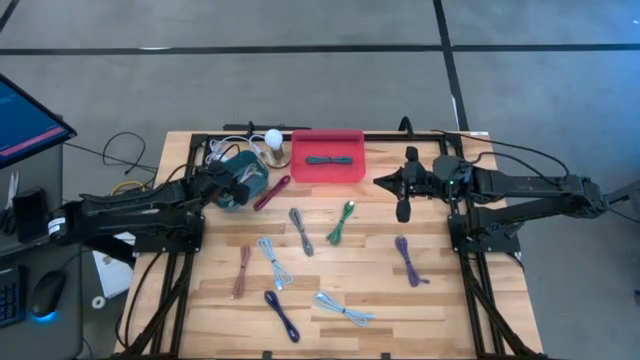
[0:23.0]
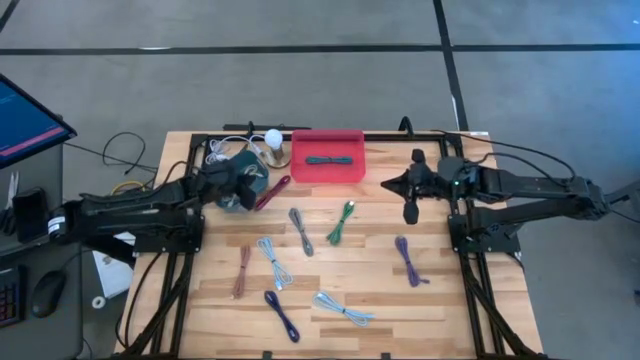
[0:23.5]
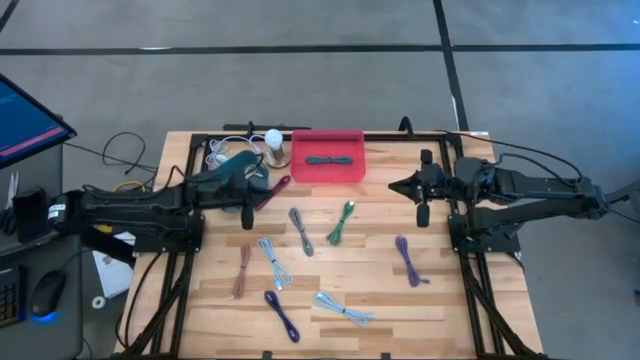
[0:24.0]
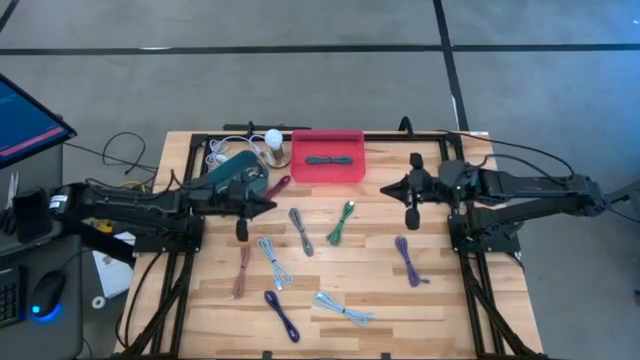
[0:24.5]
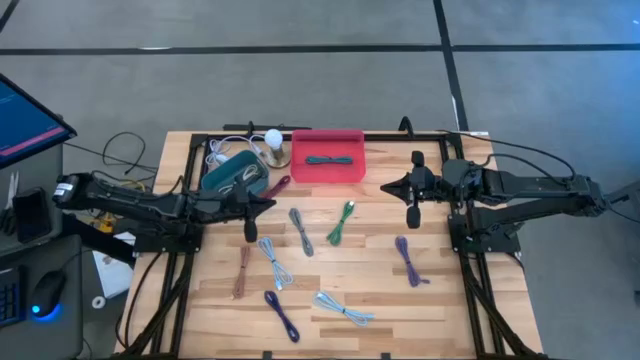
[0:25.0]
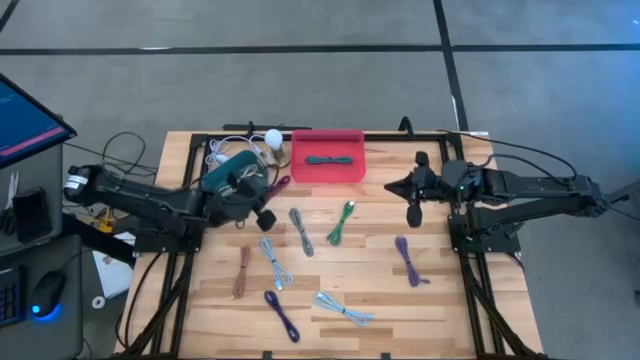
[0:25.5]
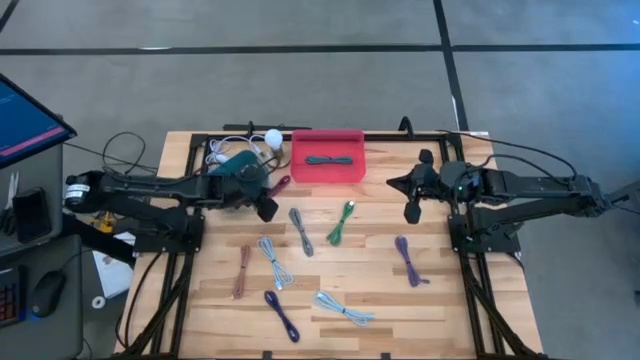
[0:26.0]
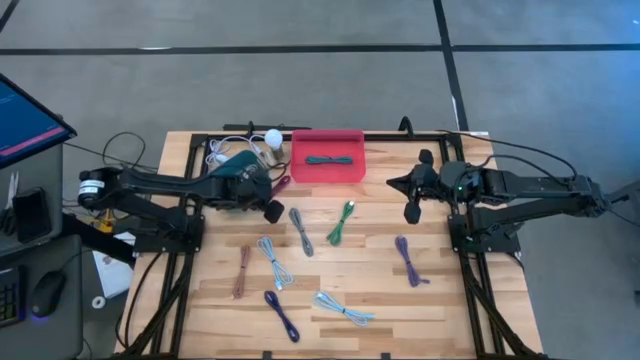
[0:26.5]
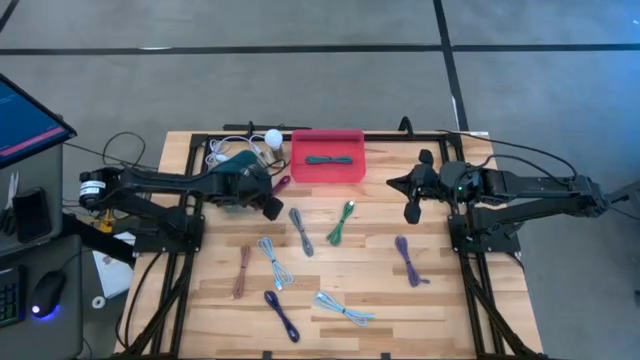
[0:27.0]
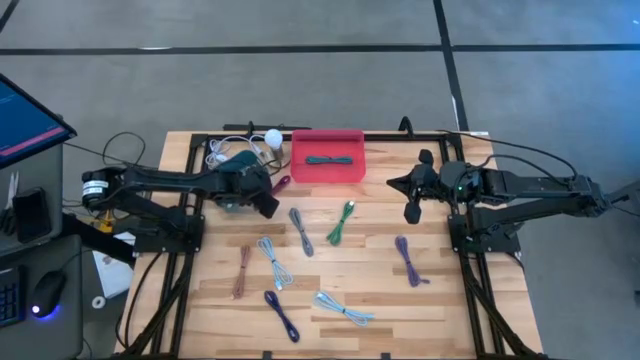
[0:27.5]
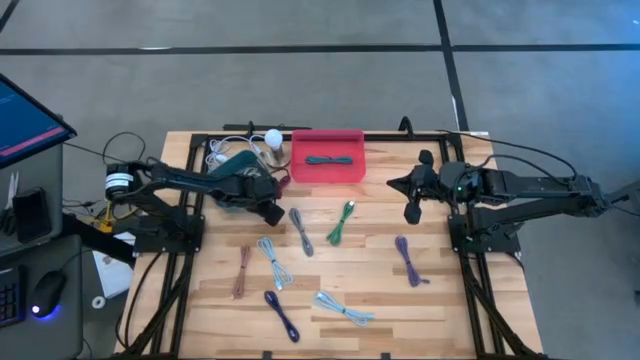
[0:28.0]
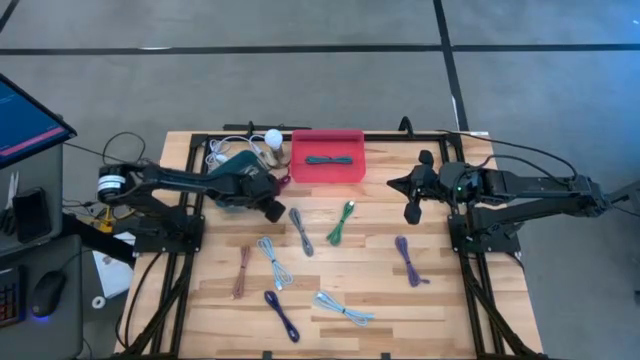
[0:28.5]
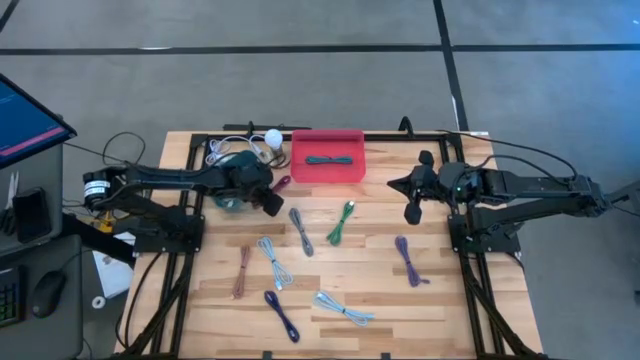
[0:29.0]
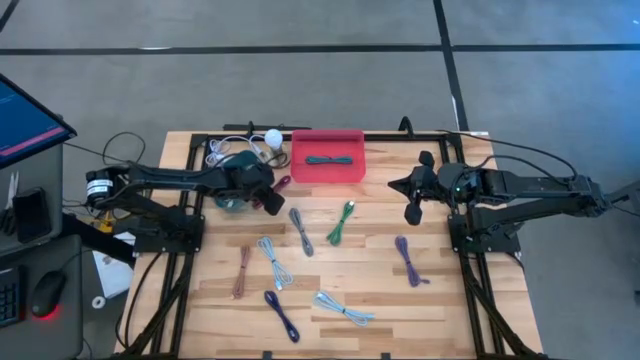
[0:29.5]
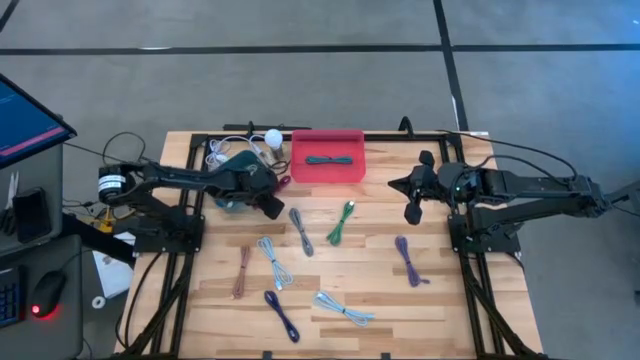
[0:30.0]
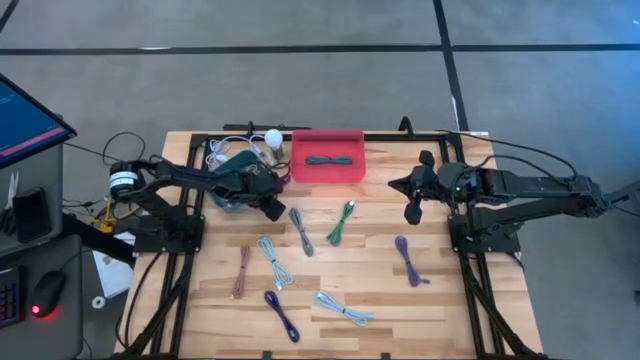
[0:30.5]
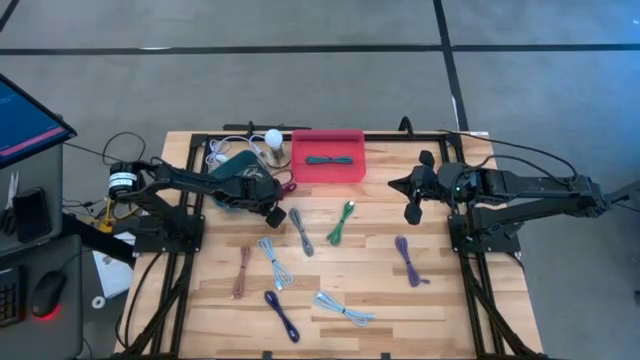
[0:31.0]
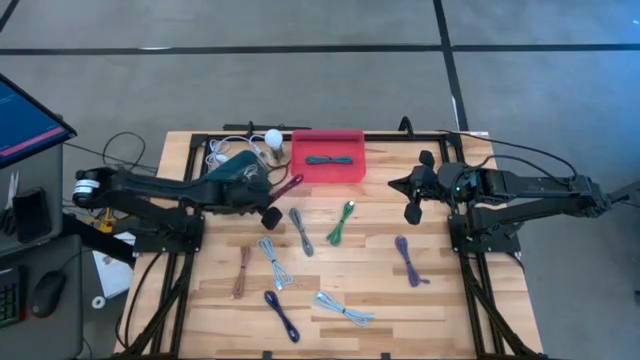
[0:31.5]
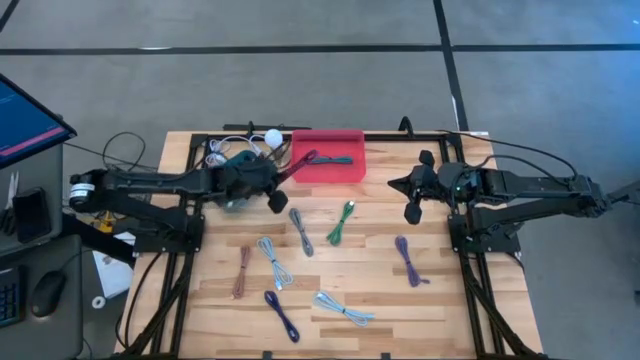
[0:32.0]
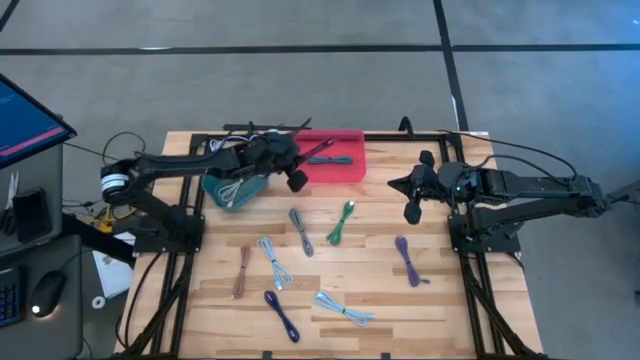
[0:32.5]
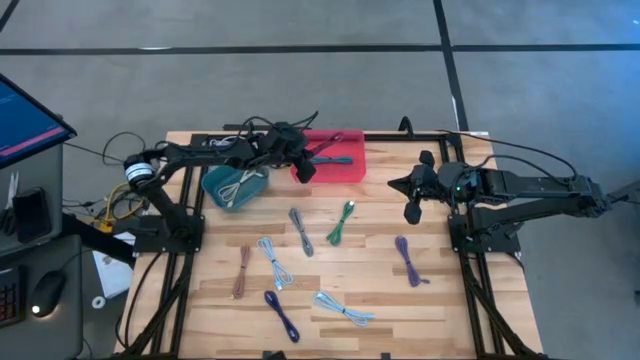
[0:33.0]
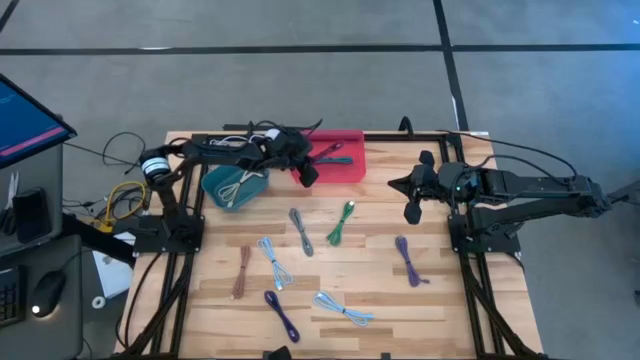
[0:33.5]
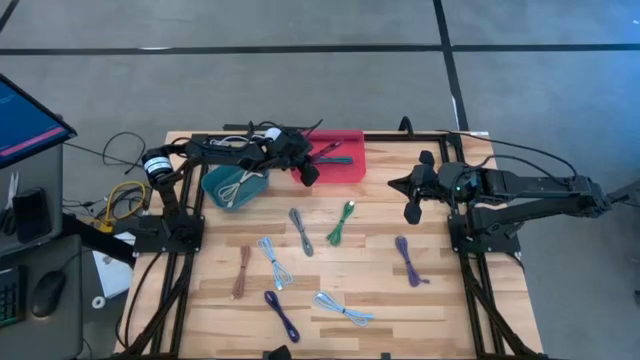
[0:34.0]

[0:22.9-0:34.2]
Task: Pick & Place USB Port
Put the black and pink USB cable into the pink bin

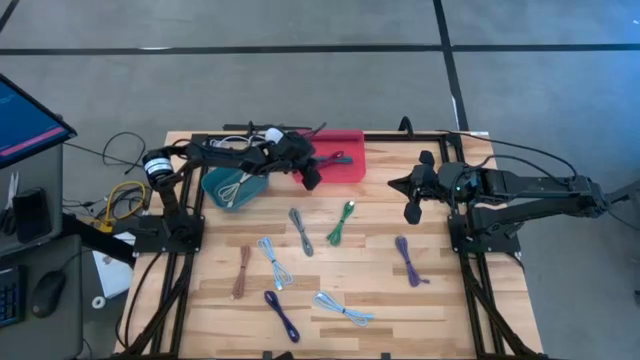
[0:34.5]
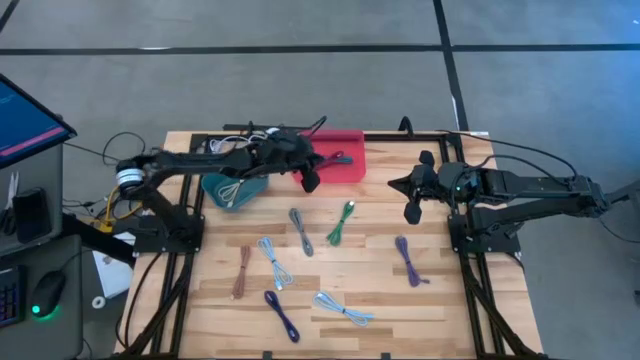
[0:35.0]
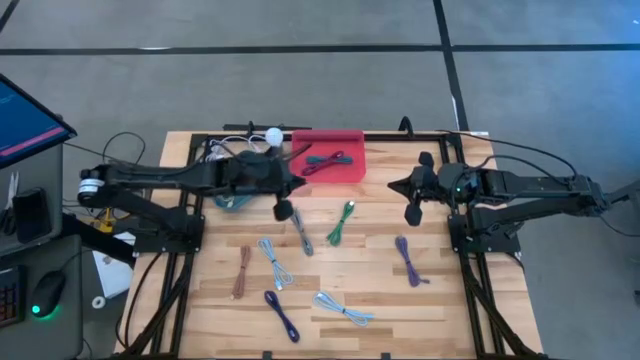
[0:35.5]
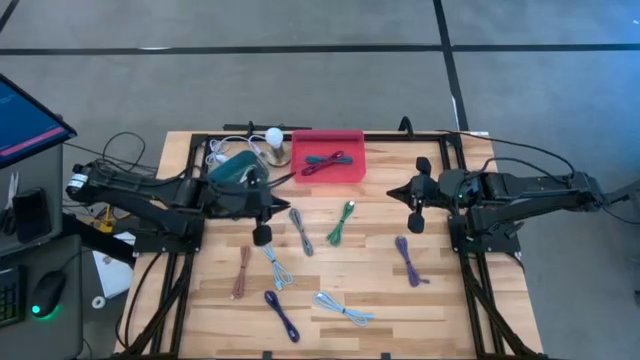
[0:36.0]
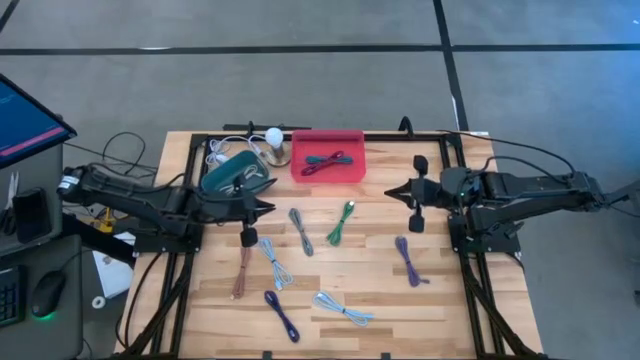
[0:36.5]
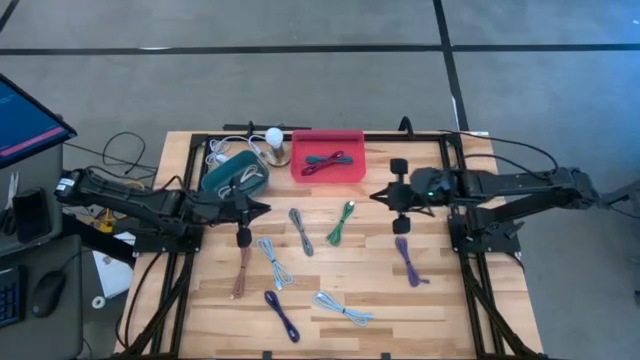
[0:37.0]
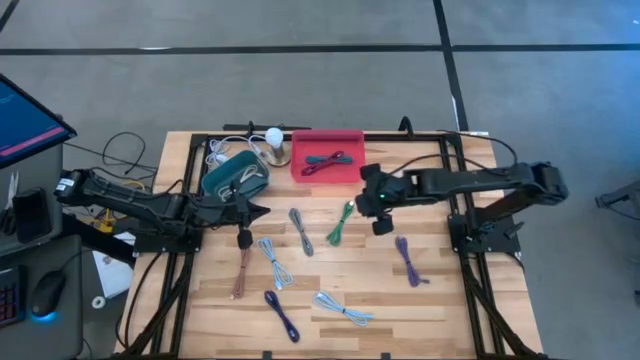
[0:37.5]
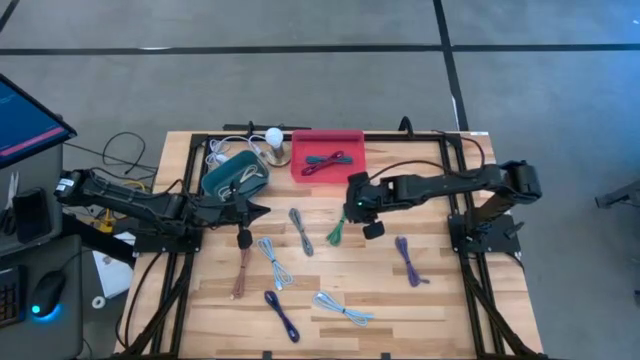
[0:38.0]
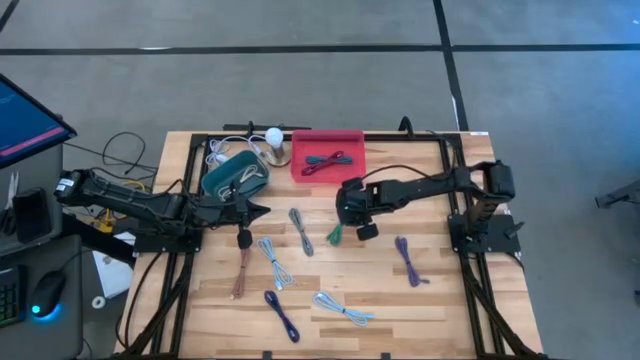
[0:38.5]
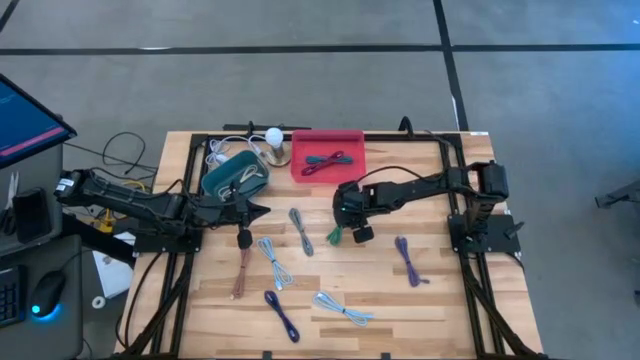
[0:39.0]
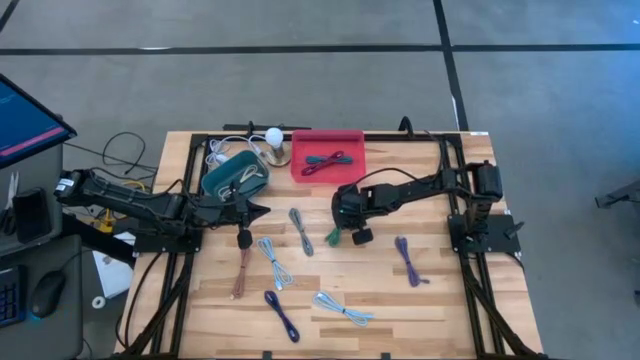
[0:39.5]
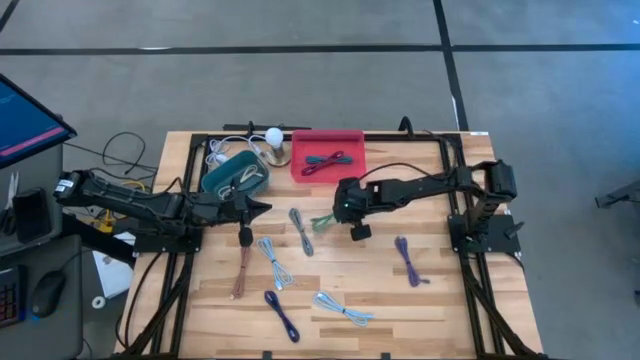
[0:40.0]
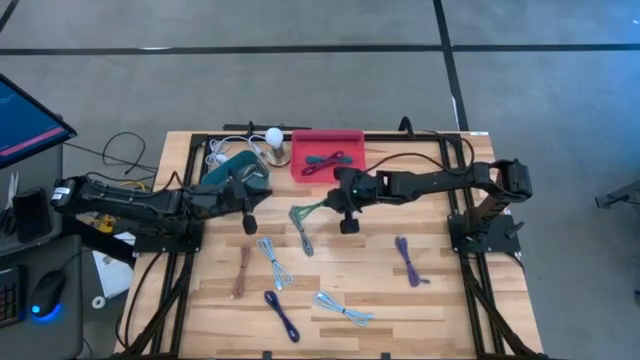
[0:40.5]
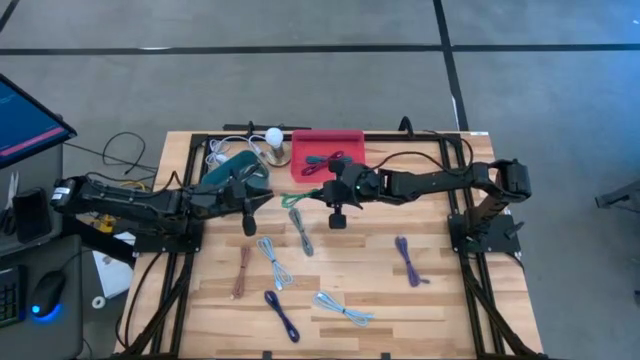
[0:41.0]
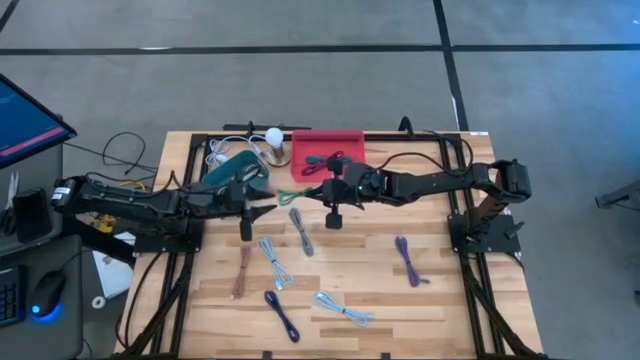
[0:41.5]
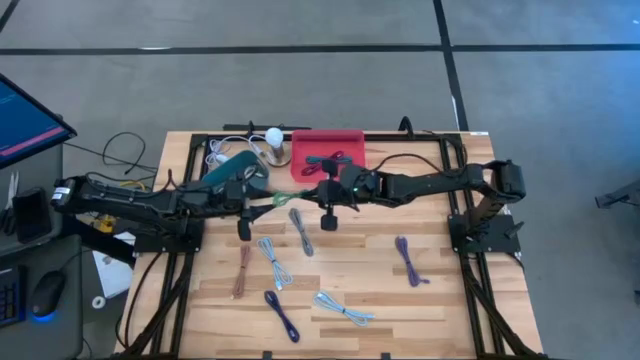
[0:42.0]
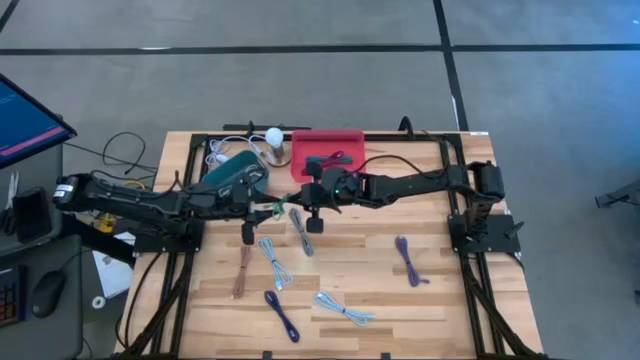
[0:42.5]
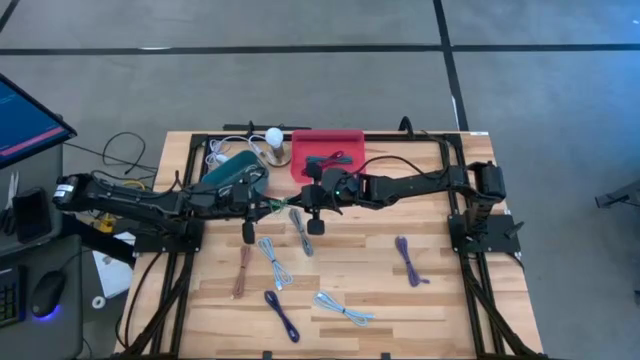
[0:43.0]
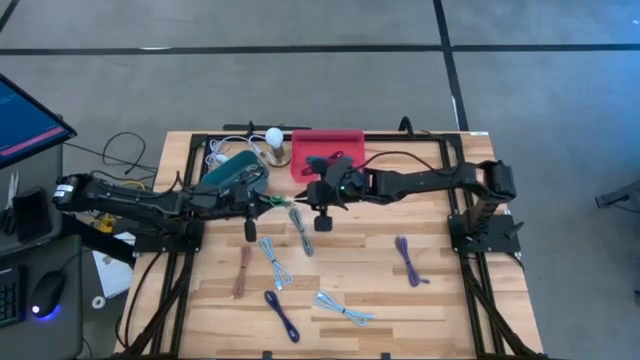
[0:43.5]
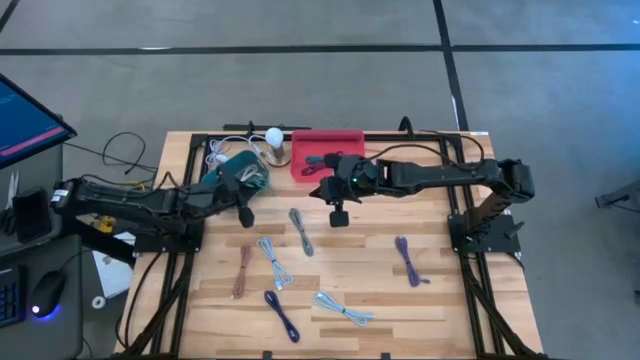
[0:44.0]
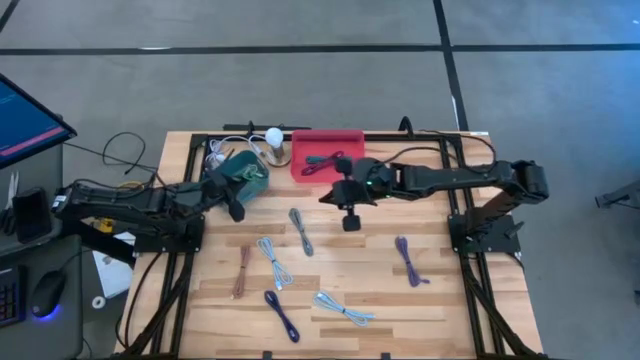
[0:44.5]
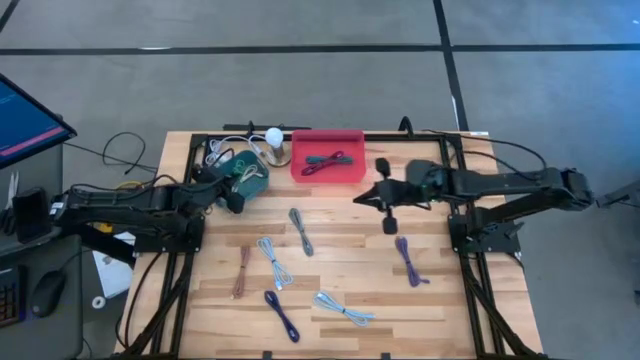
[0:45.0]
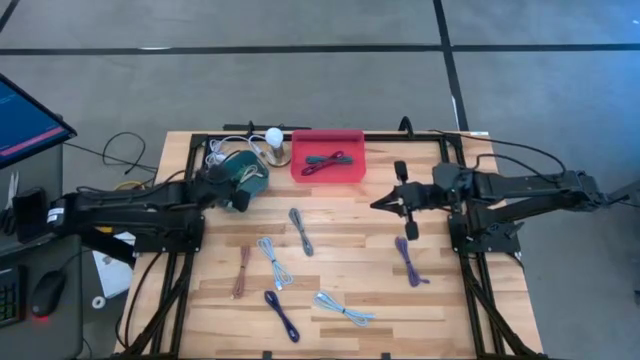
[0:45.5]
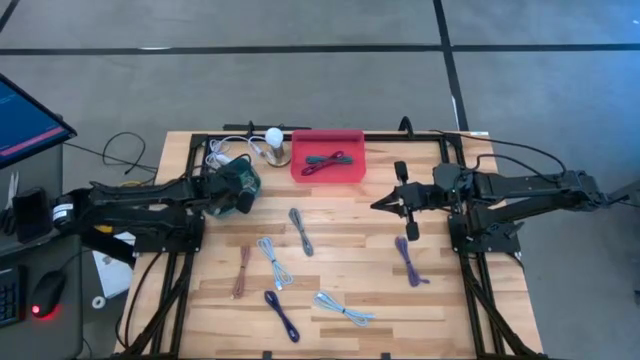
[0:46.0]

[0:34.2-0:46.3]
Put the green USB cable into the blue bin
